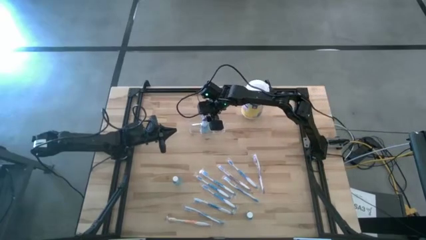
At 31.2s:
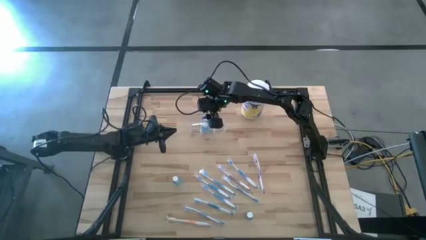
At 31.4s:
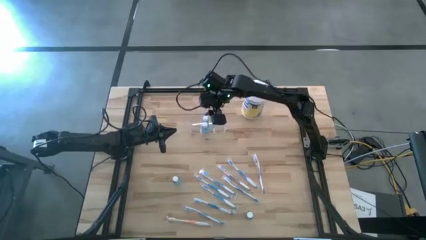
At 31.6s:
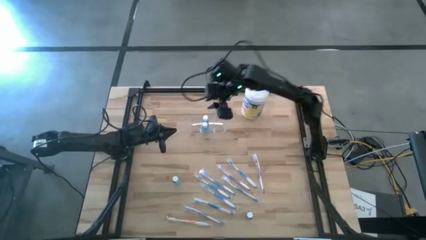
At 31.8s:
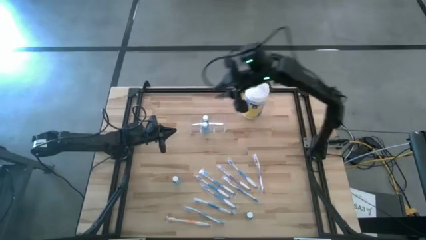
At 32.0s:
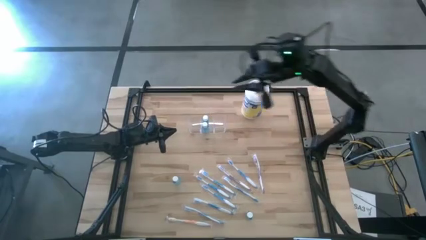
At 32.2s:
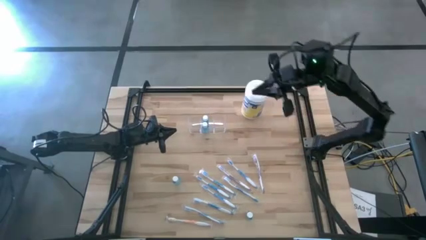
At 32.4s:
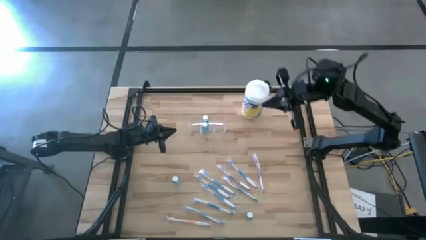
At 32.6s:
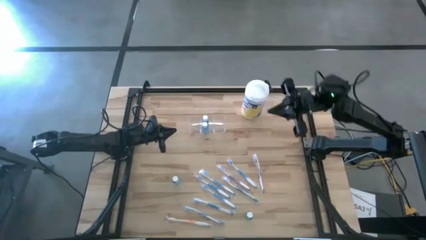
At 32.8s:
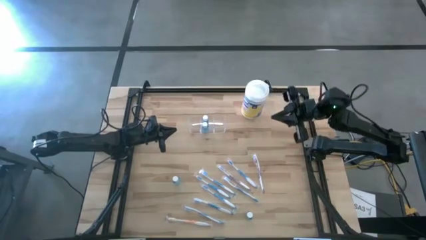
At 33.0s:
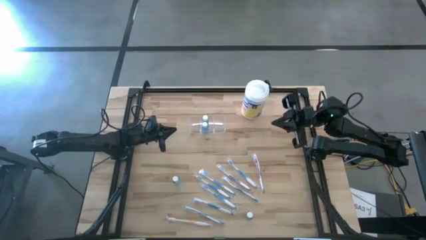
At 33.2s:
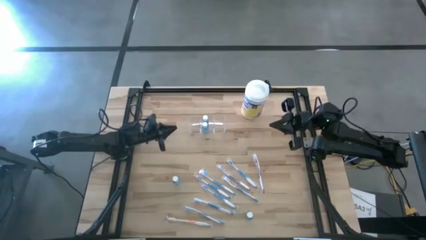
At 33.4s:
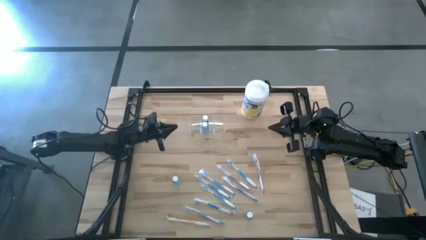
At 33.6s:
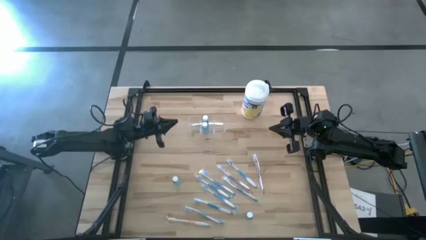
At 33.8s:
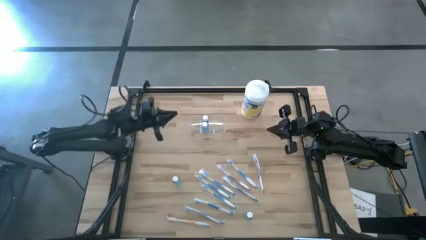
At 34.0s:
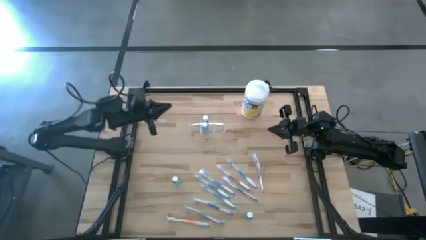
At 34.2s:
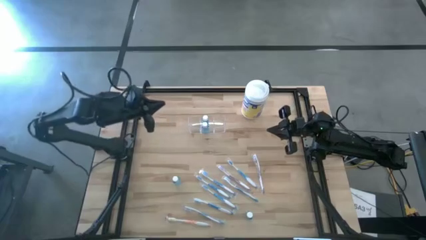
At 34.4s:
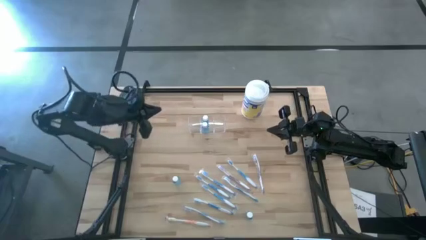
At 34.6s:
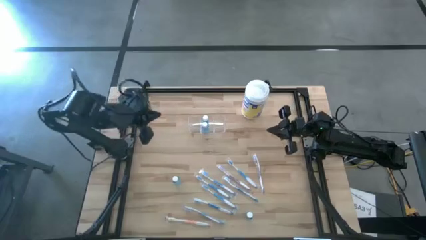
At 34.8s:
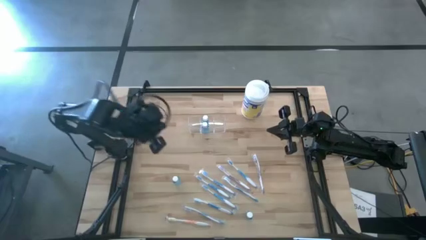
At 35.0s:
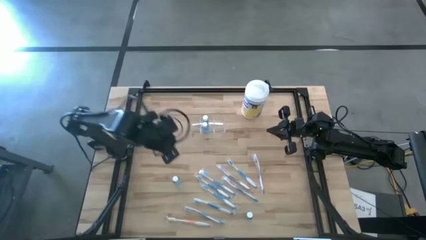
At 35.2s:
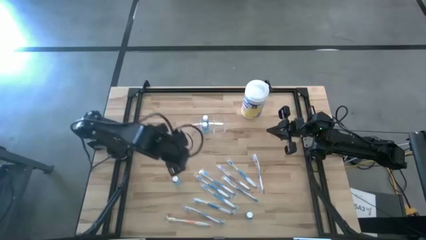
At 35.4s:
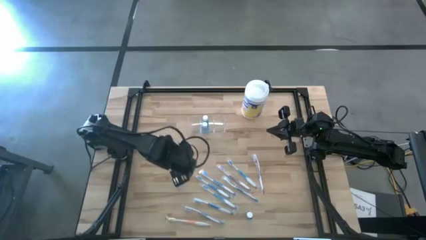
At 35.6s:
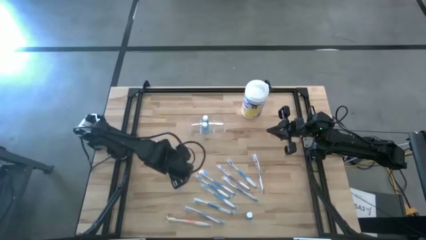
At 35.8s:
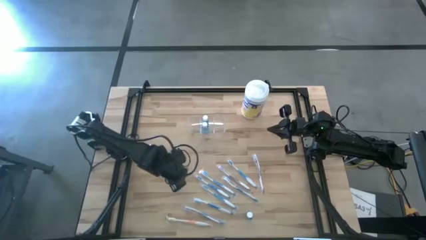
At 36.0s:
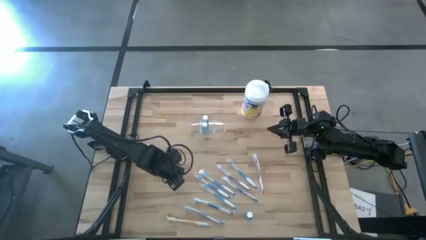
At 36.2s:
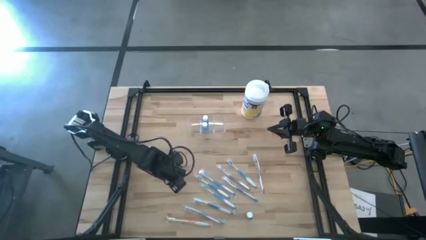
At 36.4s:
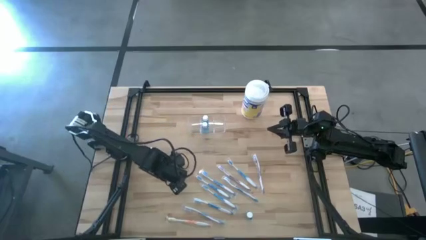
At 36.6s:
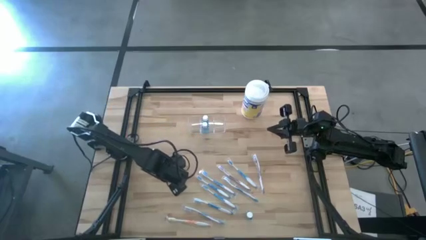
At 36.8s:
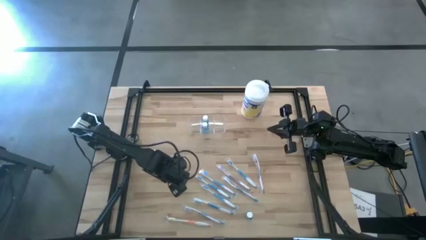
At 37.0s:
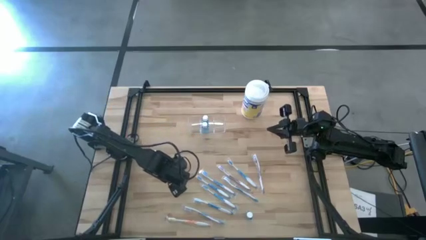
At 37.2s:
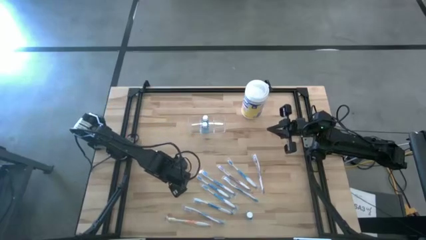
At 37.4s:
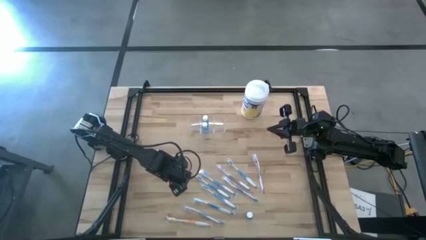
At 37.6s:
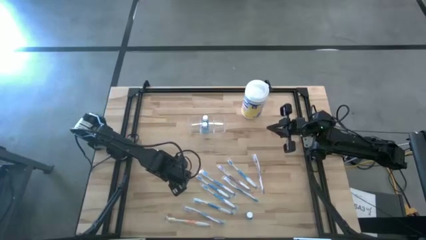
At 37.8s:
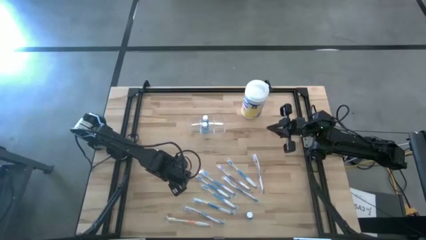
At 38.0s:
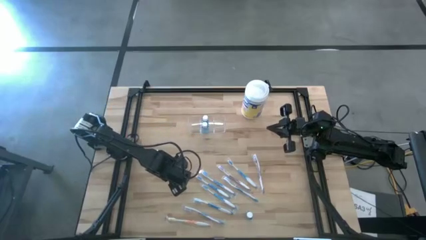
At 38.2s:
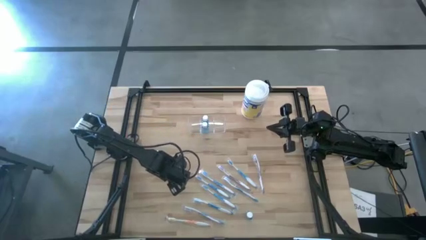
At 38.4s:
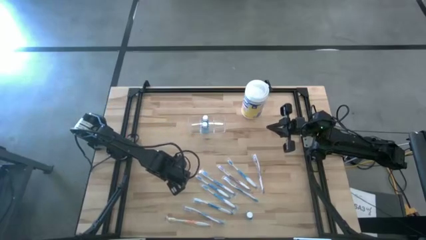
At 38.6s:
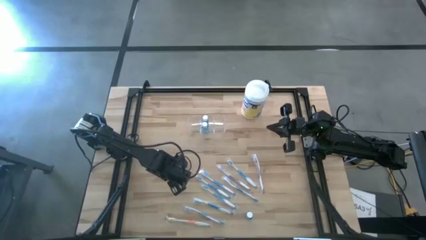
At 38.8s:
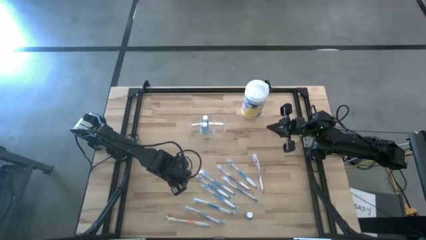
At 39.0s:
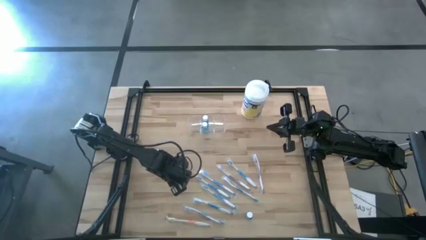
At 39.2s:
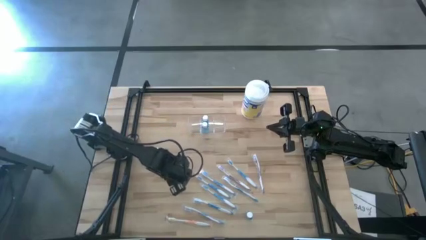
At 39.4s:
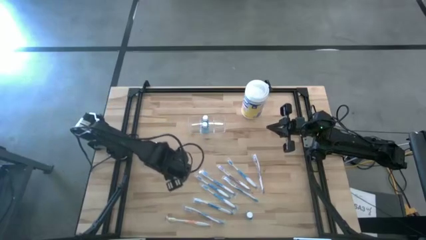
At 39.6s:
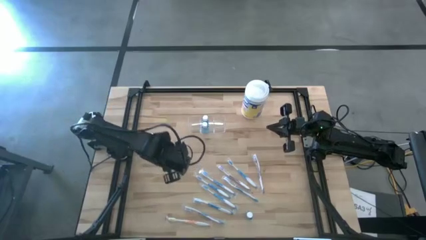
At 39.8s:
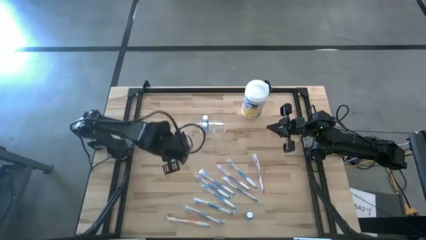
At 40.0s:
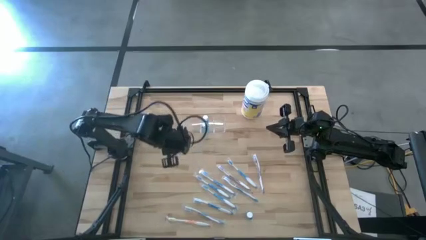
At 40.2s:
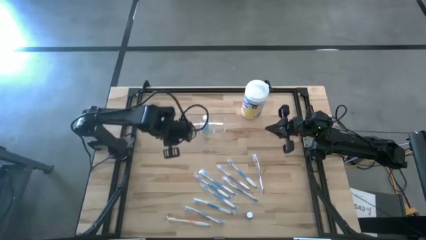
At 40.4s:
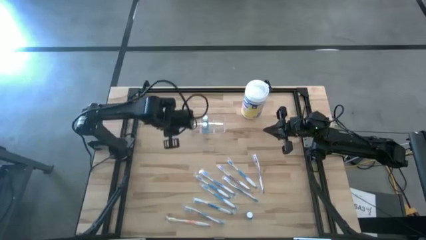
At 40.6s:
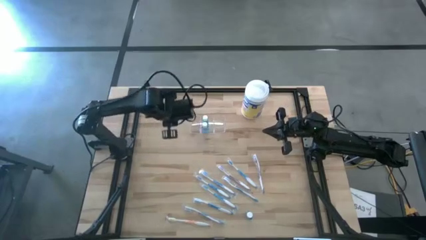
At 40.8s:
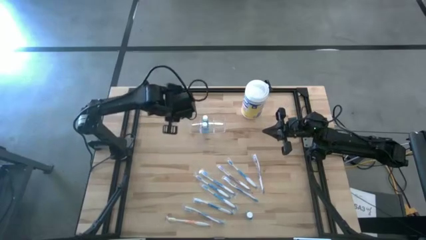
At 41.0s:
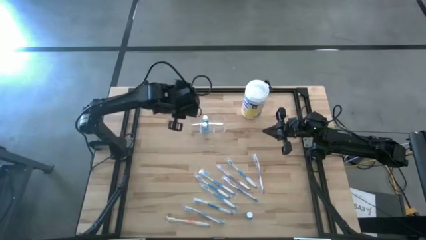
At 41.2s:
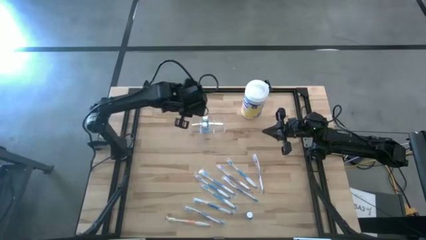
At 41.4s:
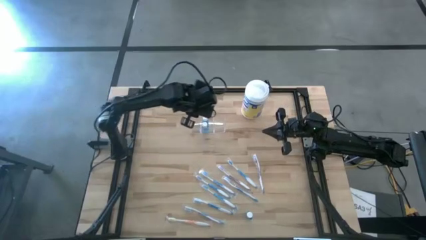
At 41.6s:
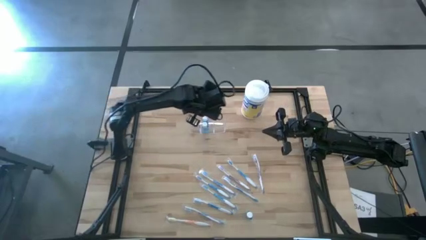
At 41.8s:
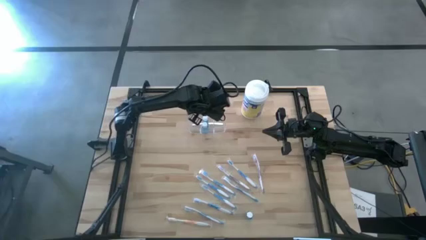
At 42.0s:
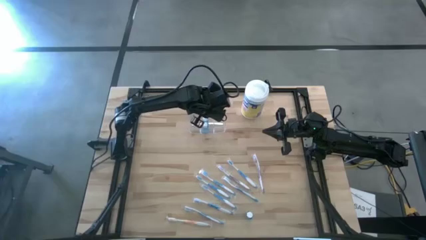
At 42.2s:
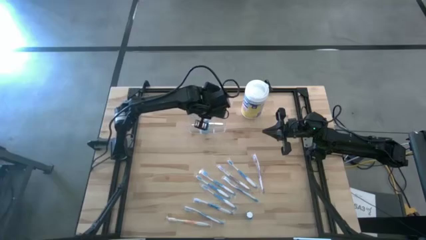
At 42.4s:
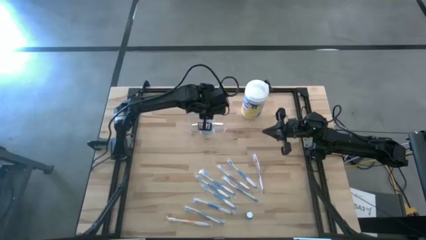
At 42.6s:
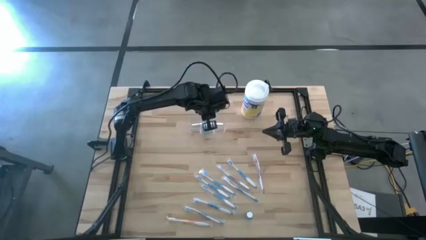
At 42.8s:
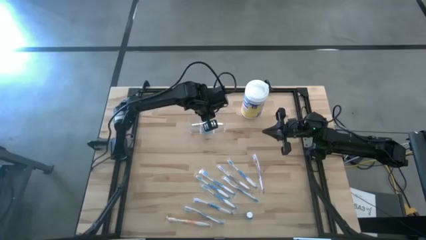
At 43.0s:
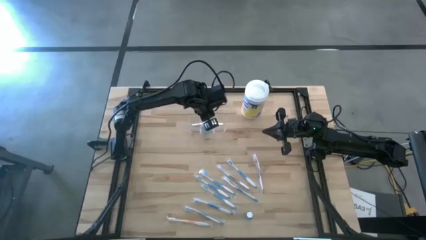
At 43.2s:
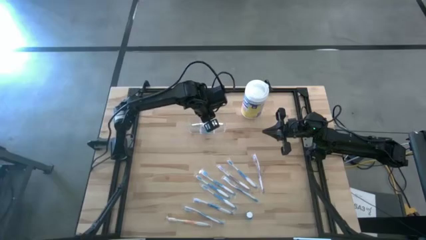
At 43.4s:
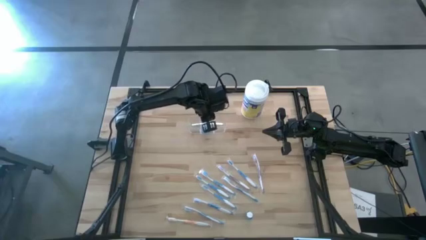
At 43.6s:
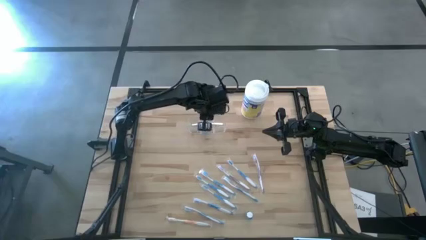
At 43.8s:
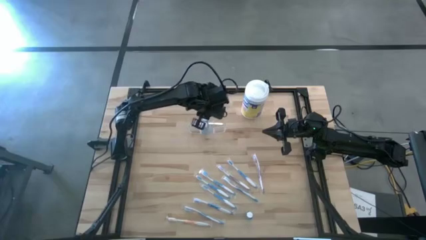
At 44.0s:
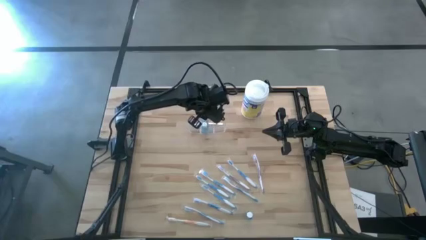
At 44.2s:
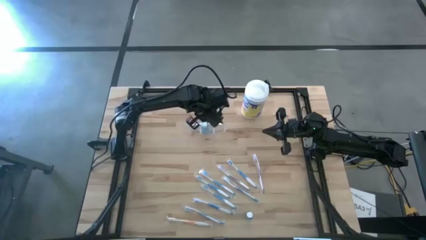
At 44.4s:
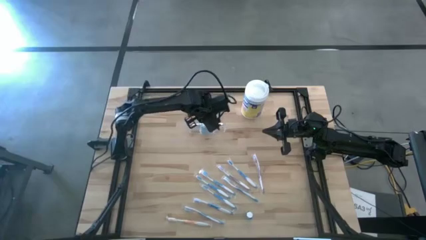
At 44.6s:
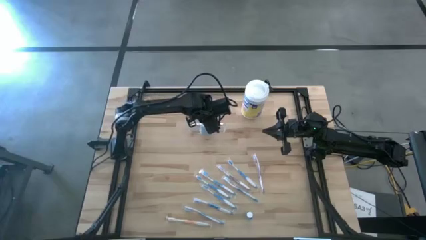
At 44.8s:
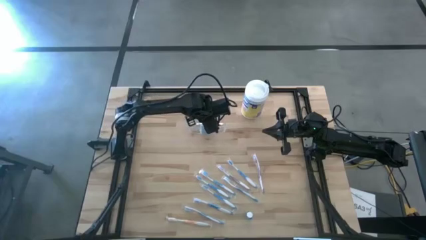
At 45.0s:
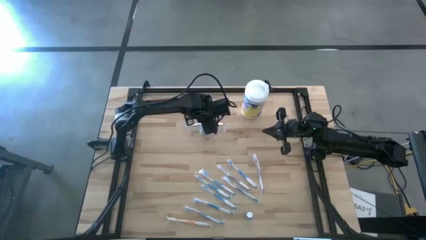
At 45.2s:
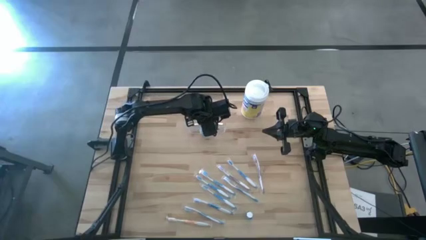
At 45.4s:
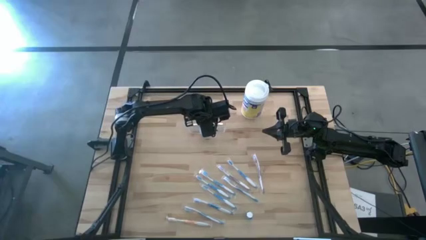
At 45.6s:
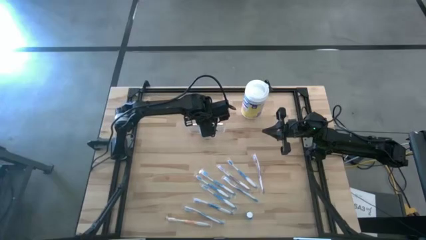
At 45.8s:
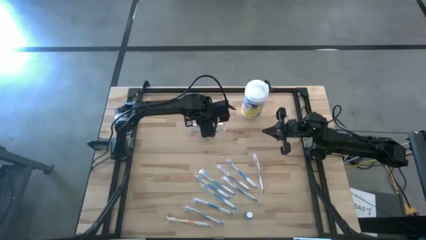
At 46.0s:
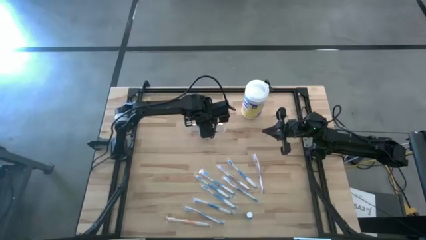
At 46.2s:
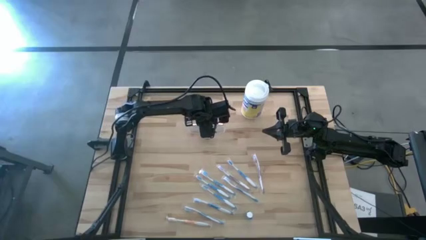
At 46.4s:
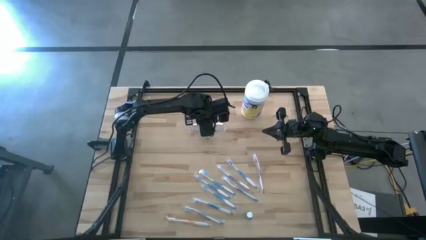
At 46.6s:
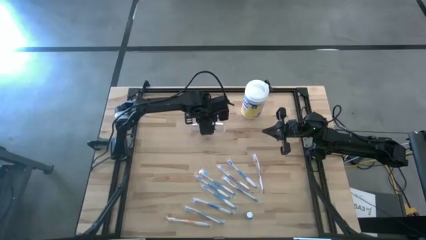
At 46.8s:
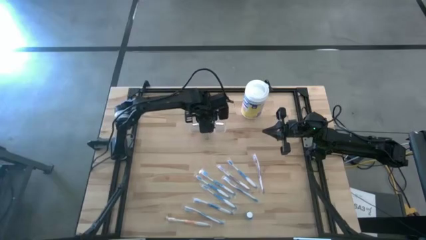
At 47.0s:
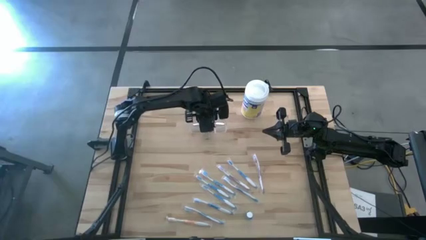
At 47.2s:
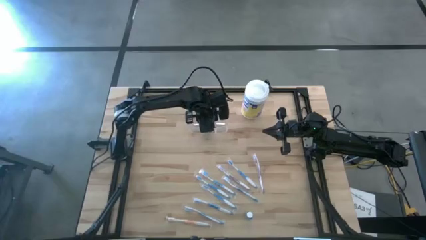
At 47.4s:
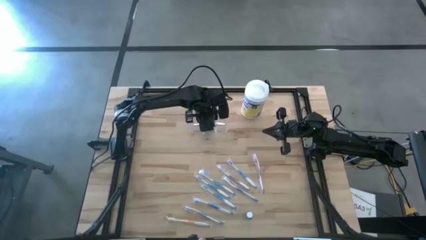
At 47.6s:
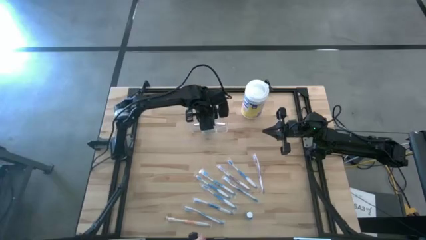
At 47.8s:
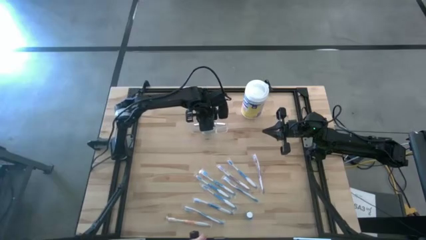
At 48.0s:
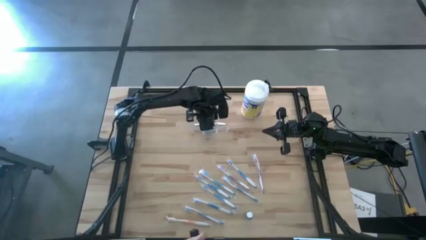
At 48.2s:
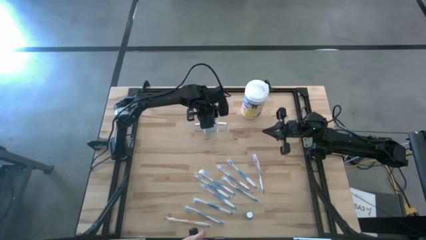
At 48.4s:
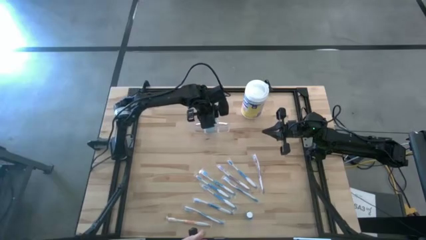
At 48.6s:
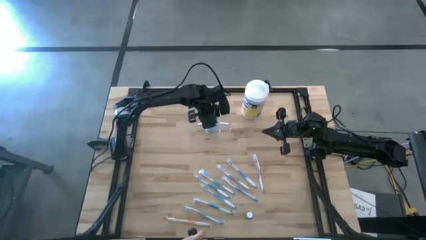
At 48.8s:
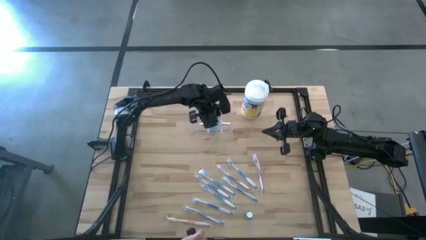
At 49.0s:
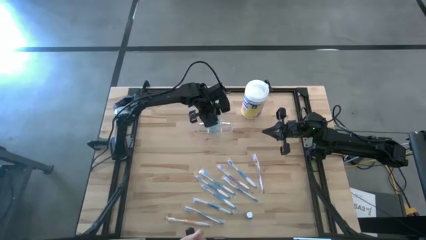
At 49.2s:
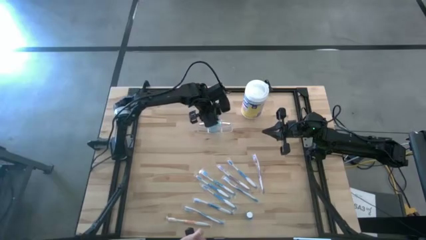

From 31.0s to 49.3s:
Task: Pick & Place toothbrushing station
Put the blue mouthwash into the middle section of the transparent organizer
